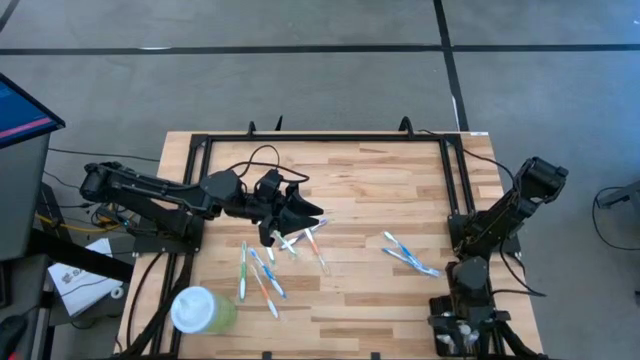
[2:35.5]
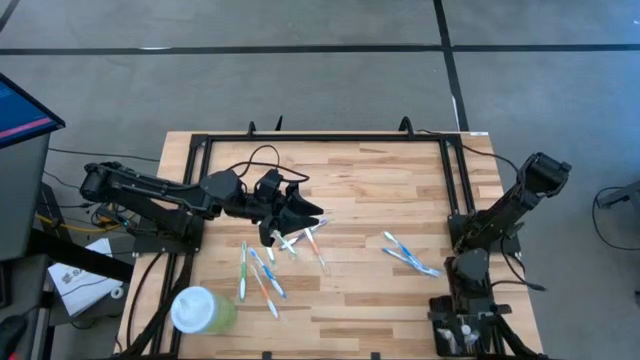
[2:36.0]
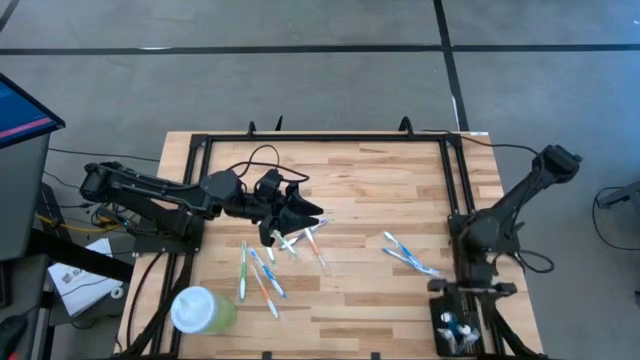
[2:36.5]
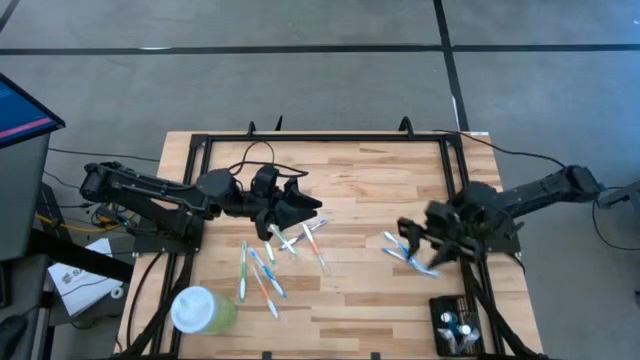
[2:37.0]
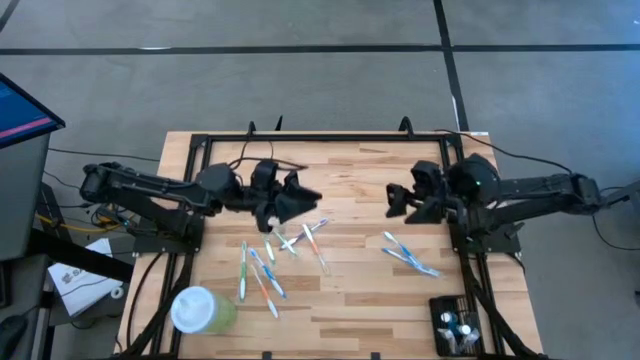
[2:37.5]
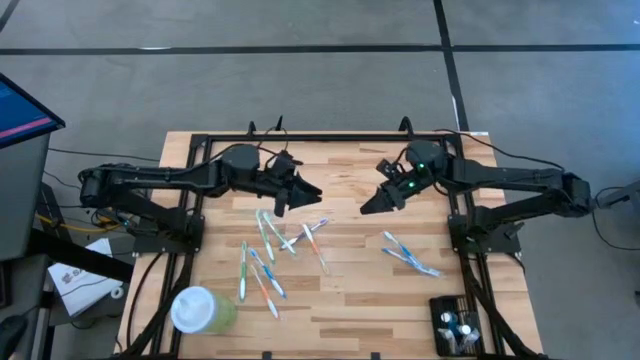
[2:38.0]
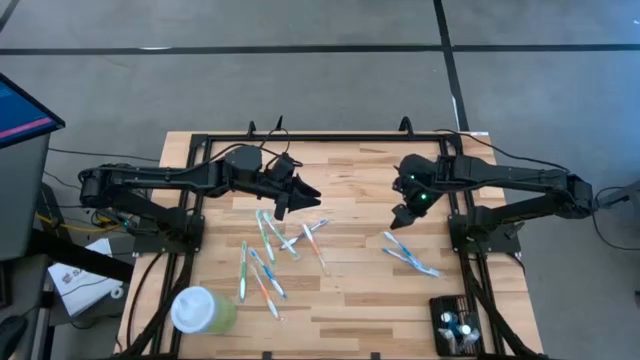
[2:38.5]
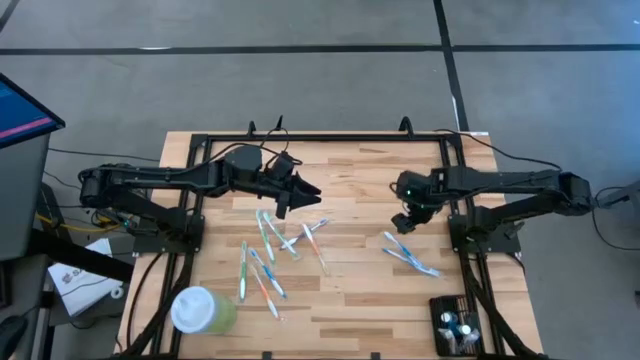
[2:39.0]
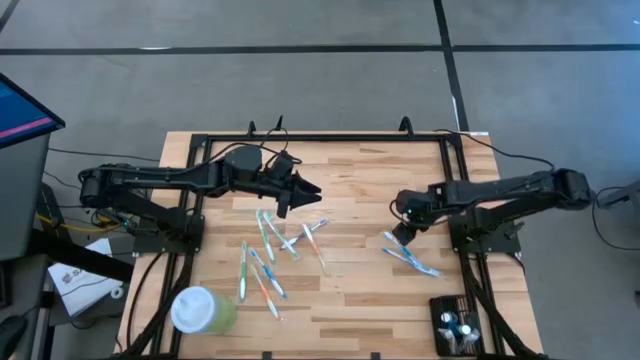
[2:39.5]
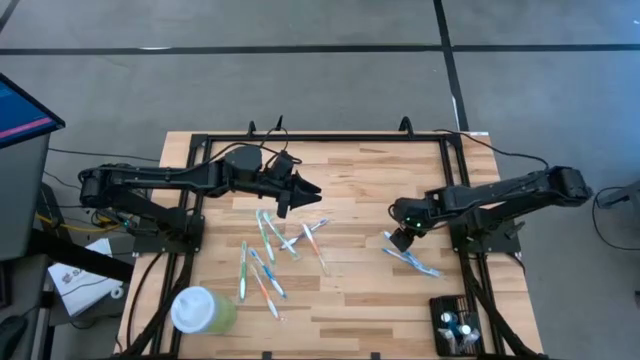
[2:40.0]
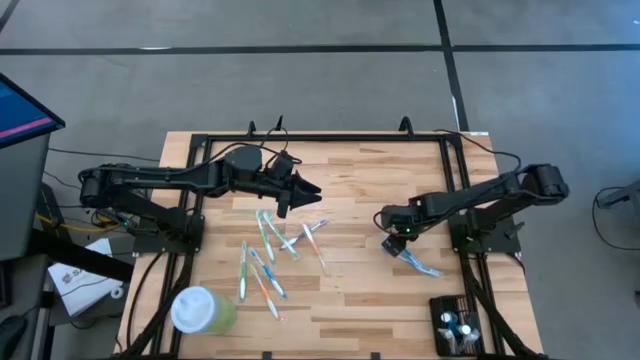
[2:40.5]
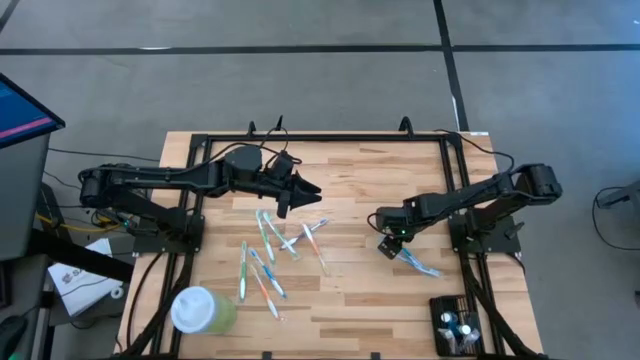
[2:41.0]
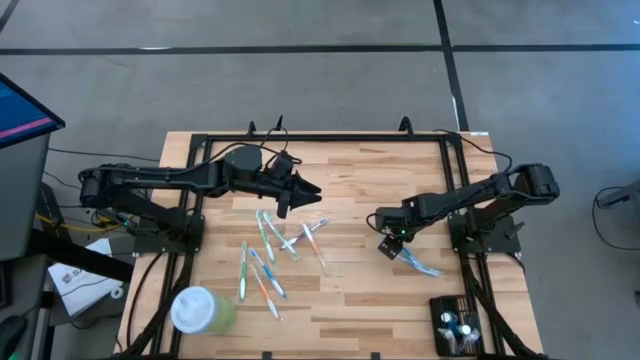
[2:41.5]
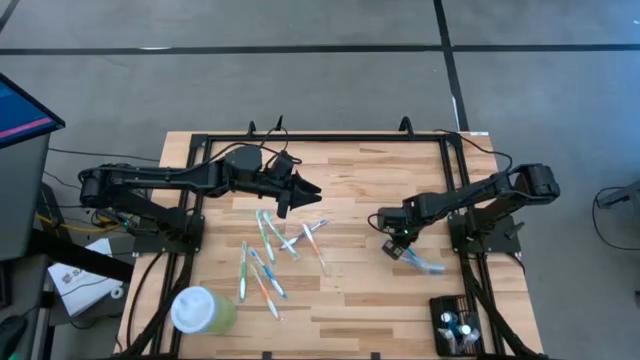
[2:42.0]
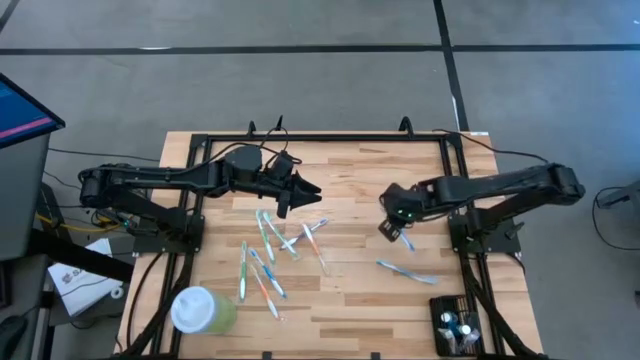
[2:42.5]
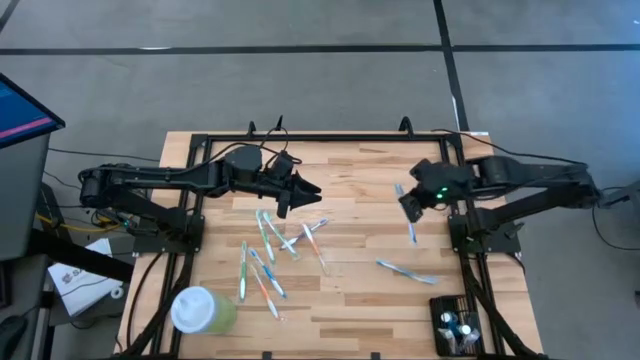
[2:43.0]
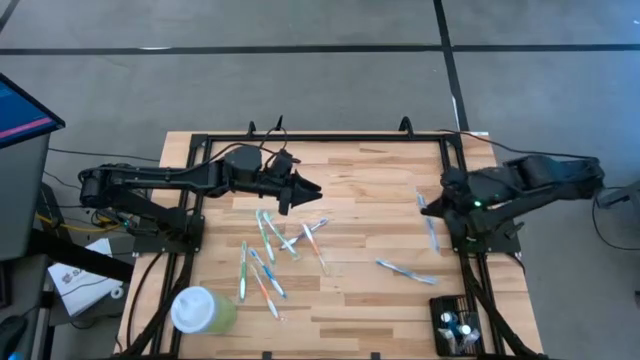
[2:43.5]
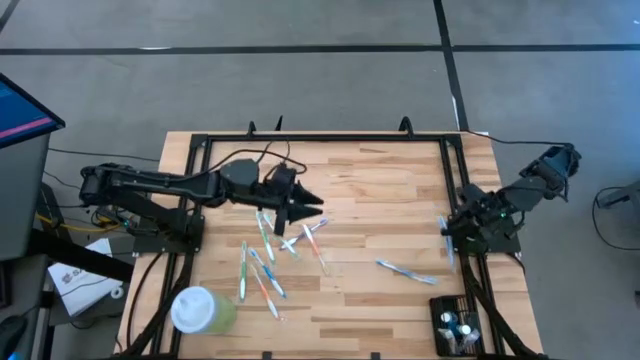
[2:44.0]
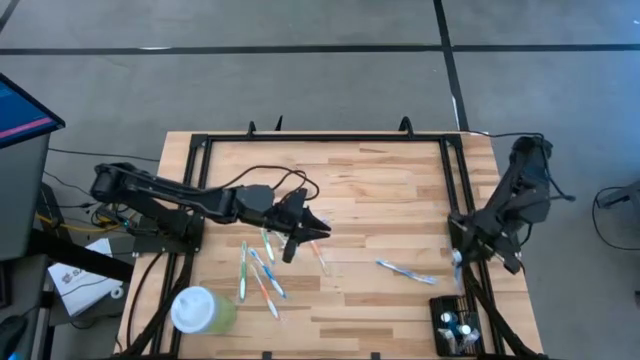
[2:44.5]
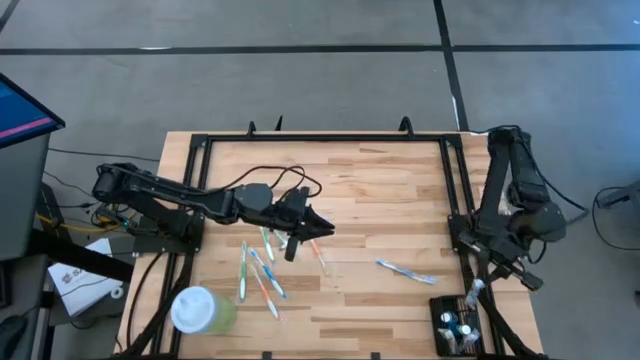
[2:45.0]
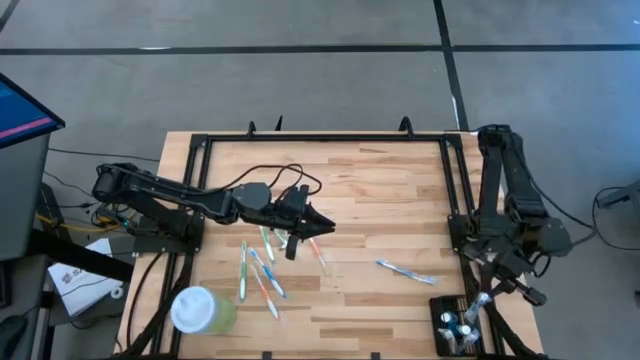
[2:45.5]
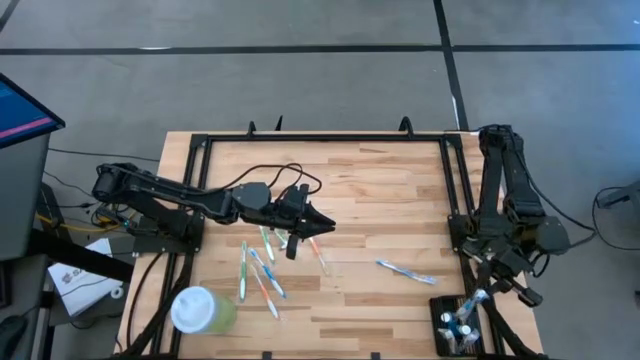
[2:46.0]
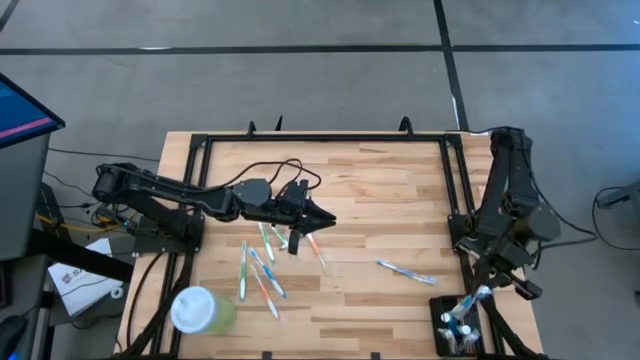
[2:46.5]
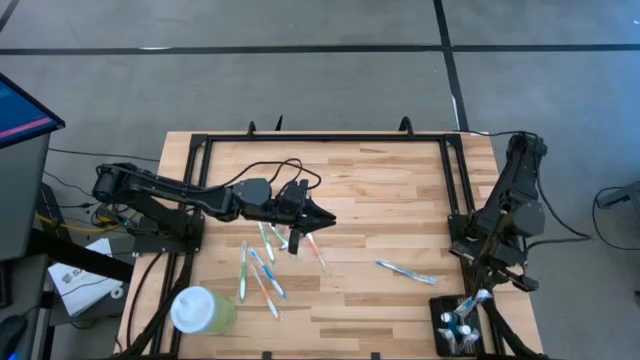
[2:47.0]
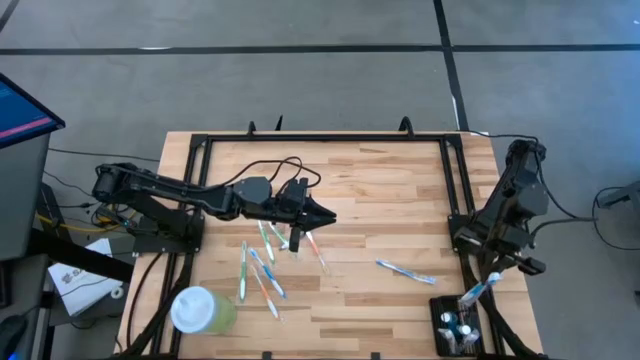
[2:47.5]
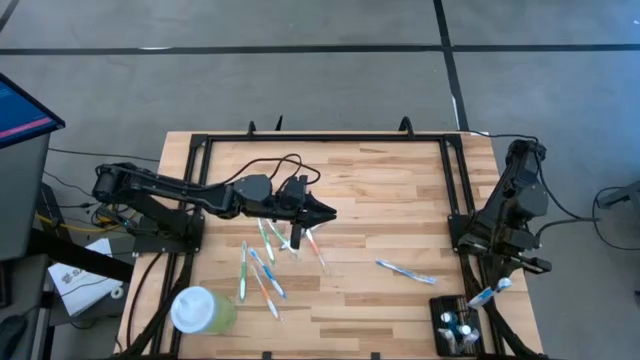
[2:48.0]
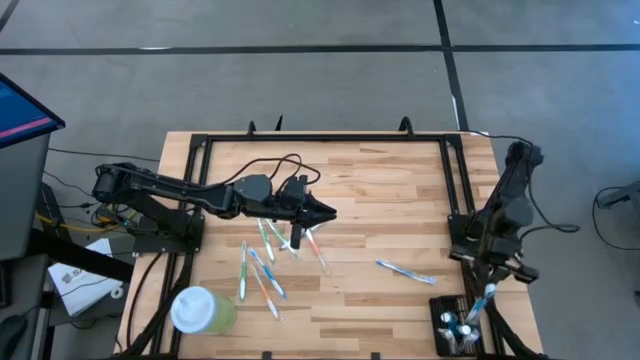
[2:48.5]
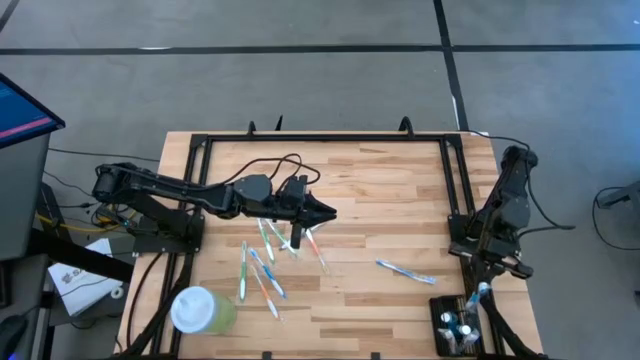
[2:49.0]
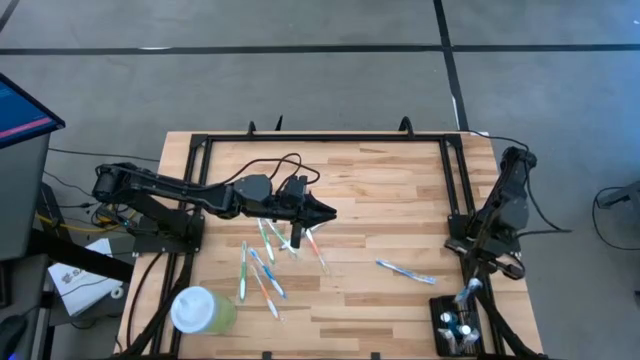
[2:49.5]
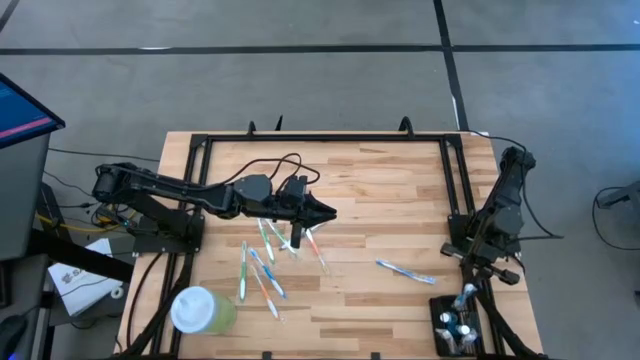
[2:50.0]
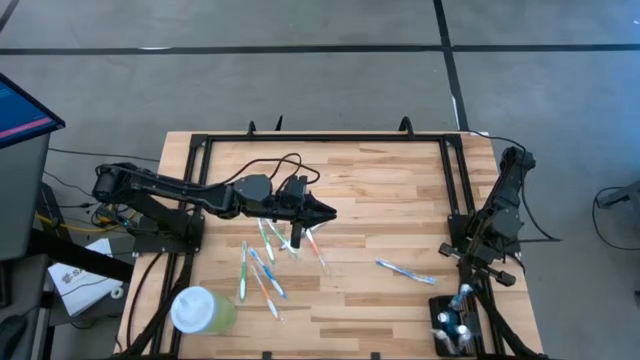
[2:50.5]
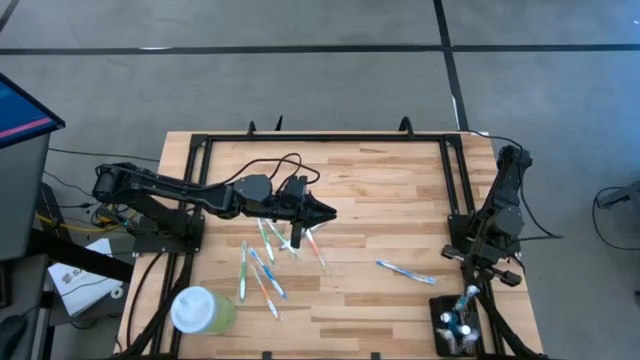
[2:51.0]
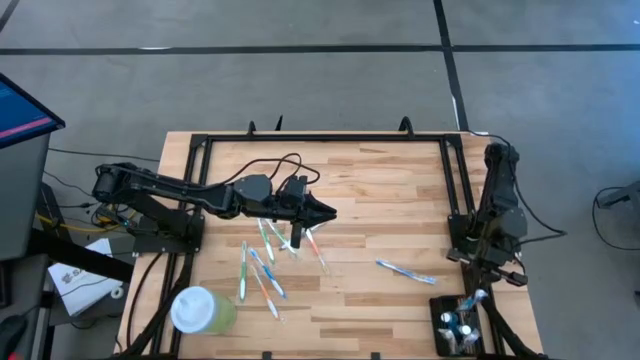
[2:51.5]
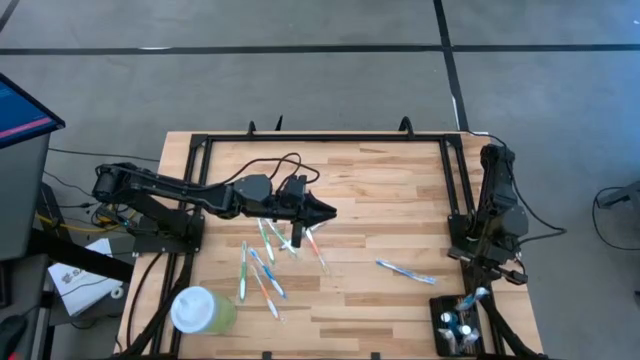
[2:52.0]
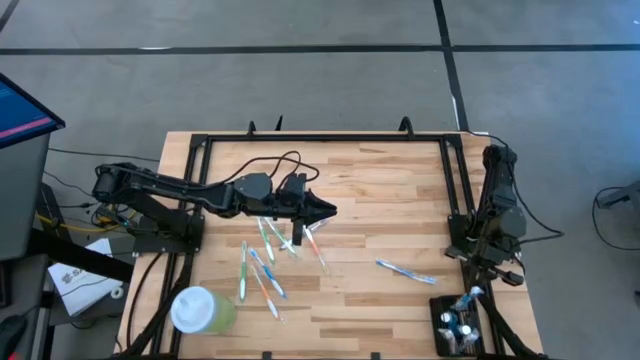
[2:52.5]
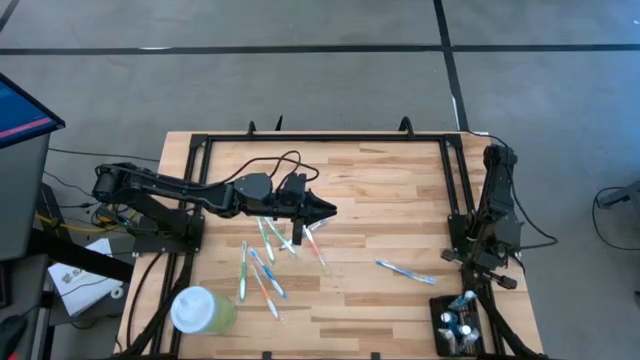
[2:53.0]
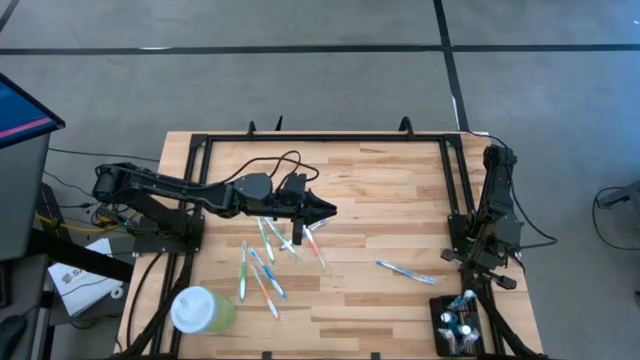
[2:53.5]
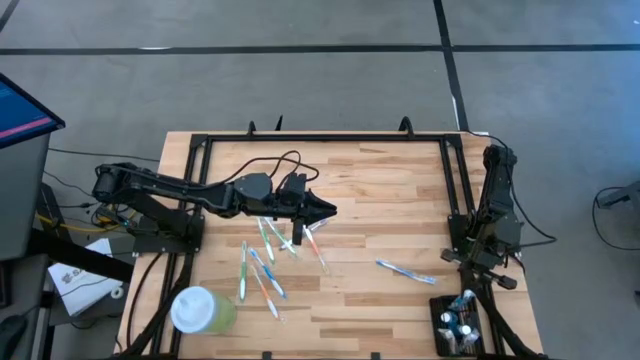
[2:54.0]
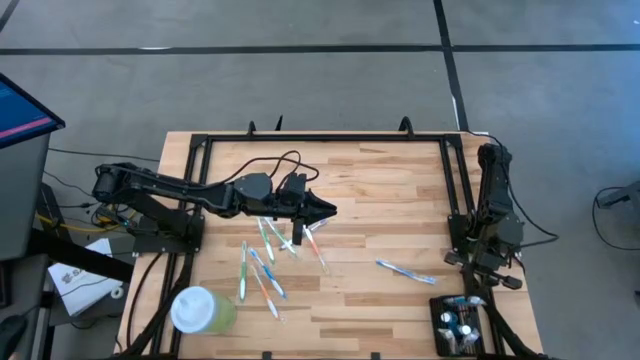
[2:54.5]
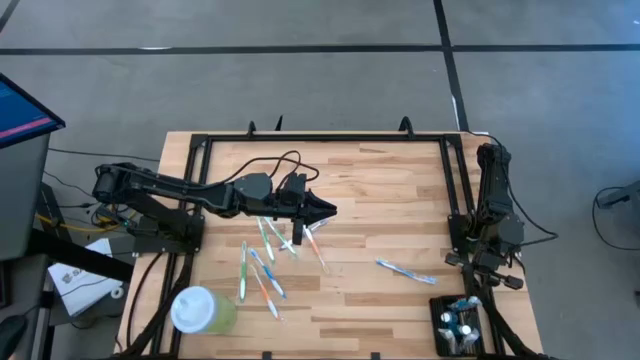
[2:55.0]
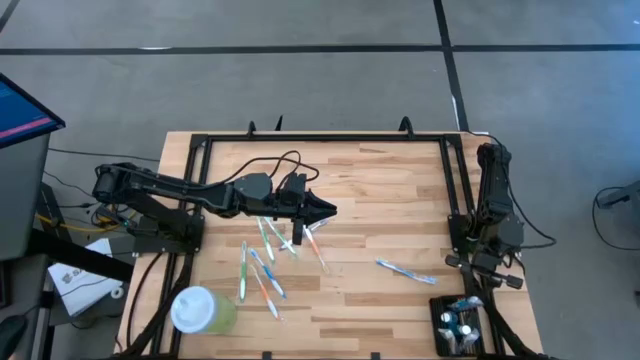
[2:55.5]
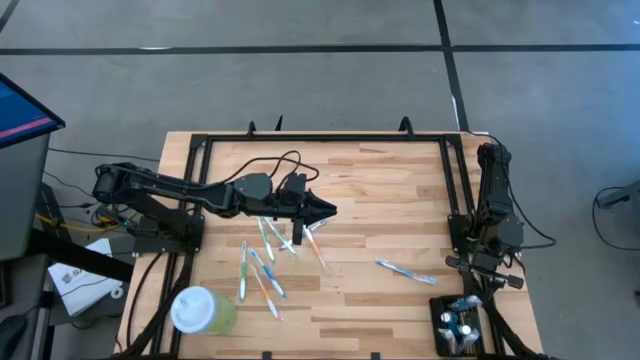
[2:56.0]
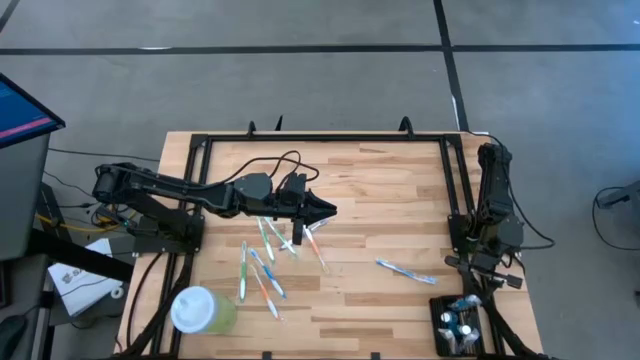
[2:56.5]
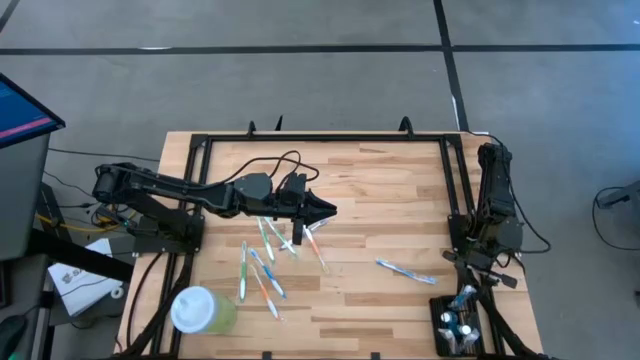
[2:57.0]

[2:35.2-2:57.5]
Task: Pick & Place toothbrushing station
Put the top blue toothbrush into the black organizer
